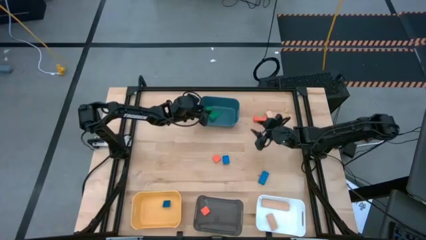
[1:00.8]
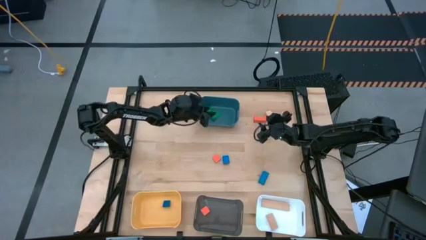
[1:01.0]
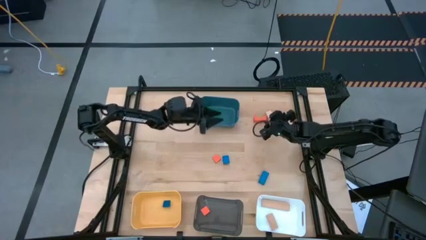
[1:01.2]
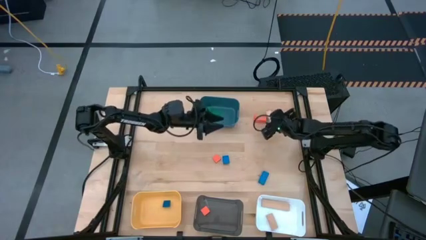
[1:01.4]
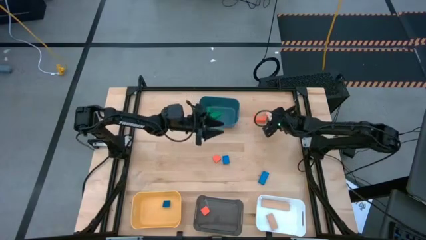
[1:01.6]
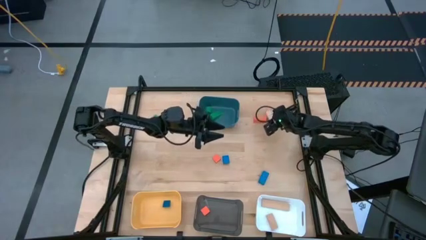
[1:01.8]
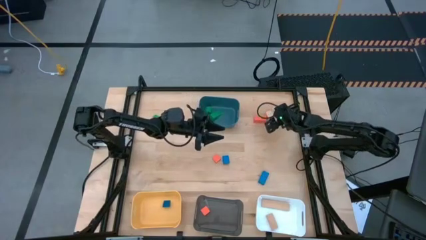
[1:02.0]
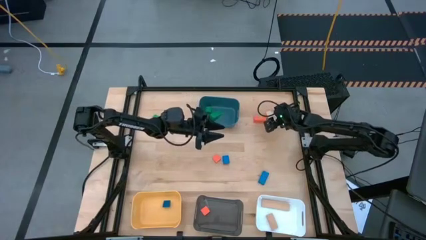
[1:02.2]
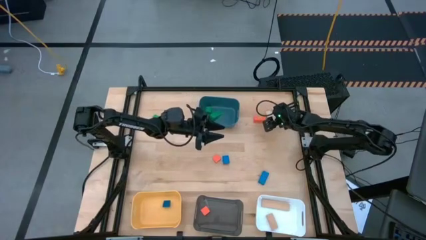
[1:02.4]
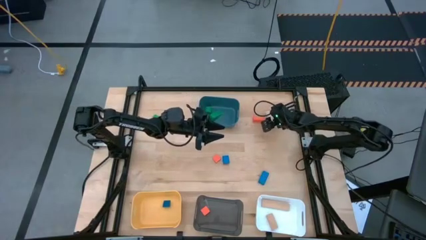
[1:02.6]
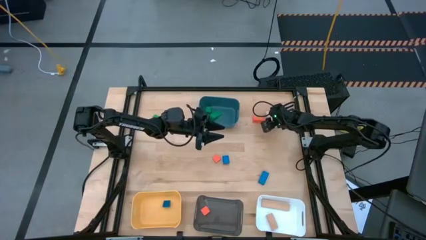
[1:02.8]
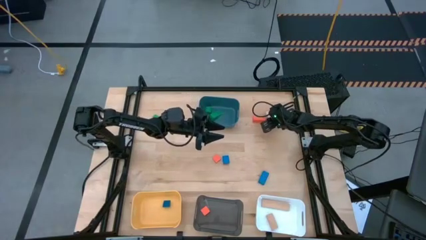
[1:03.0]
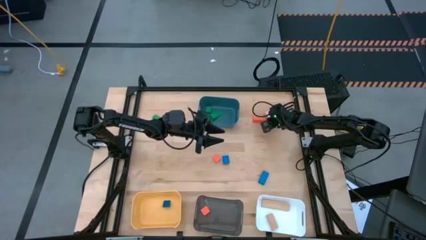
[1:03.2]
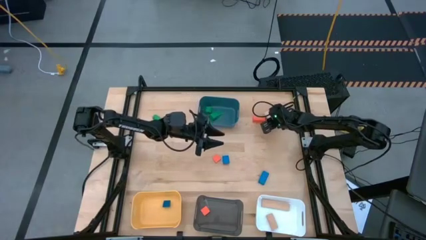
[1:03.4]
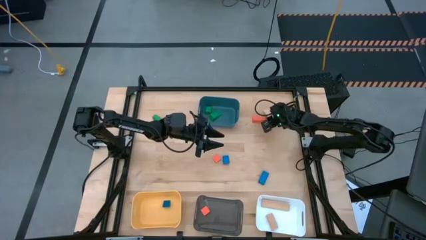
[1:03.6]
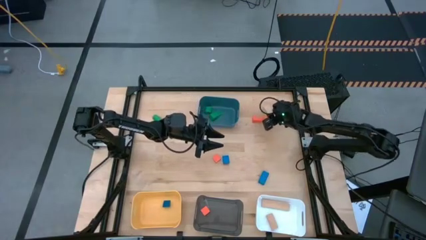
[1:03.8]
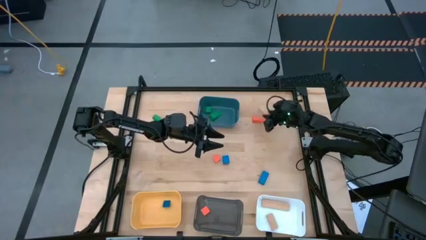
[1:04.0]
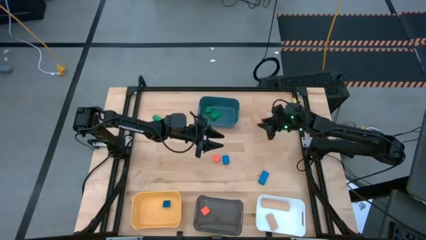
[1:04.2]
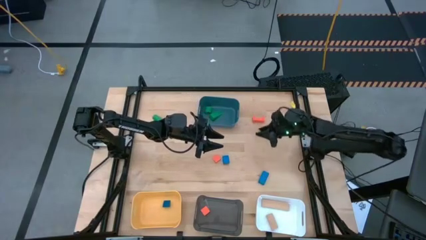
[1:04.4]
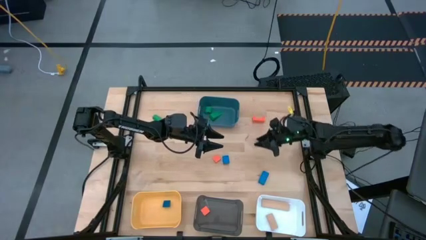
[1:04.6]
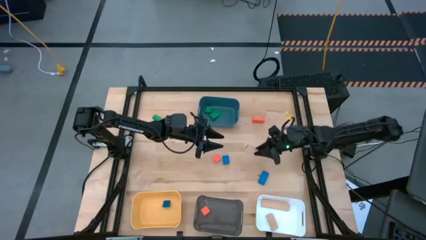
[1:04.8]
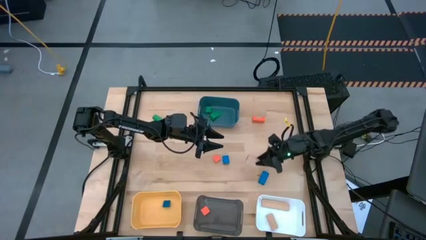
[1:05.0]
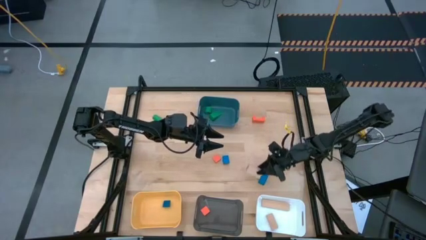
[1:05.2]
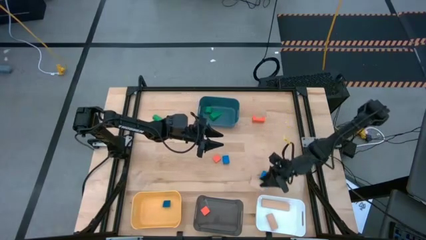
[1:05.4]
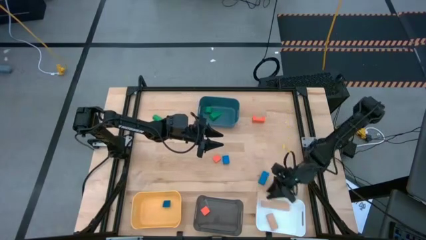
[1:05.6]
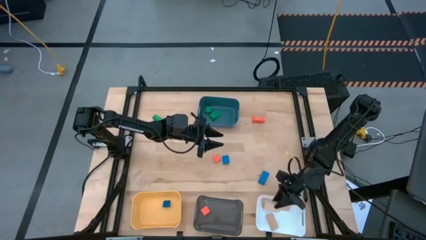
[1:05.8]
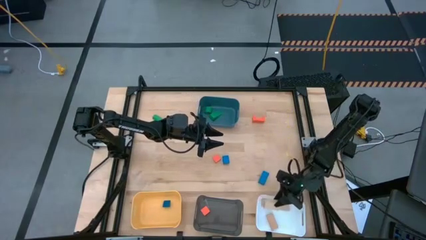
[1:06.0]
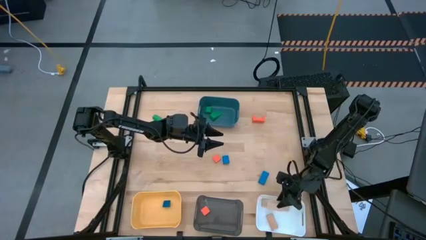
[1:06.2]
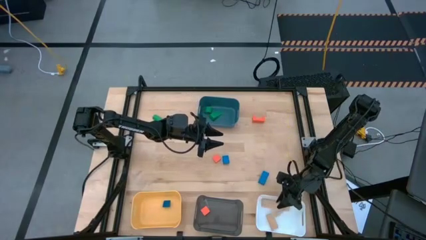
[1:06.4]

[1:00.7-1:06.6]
Task: Sort & place blocks by color
Put the light brown block into the white bin

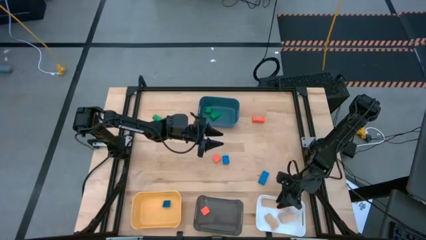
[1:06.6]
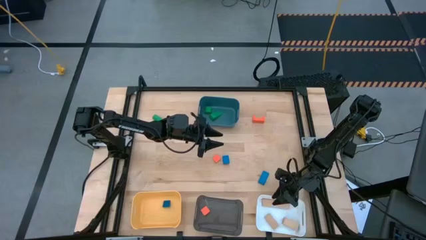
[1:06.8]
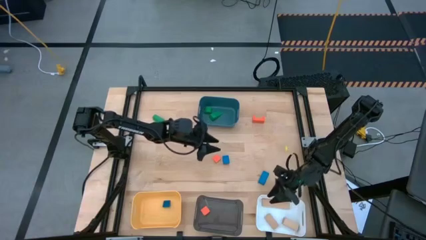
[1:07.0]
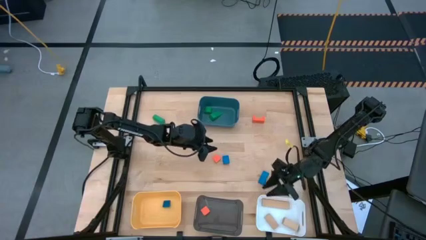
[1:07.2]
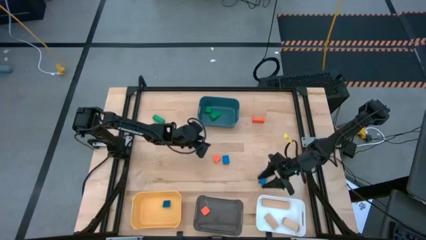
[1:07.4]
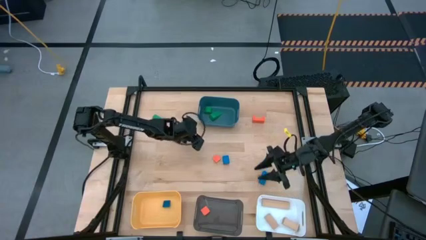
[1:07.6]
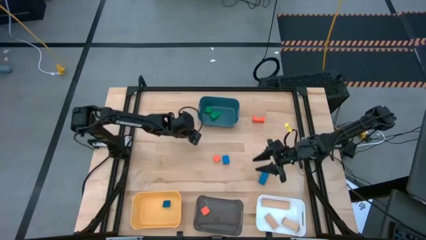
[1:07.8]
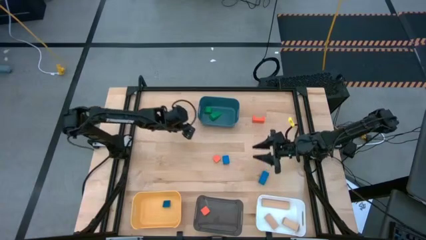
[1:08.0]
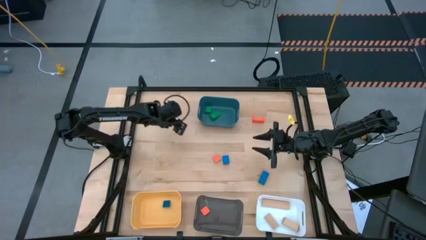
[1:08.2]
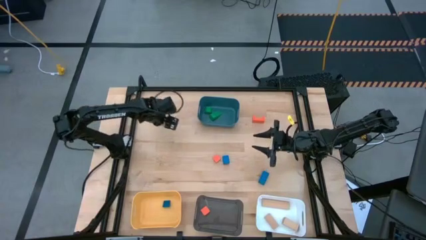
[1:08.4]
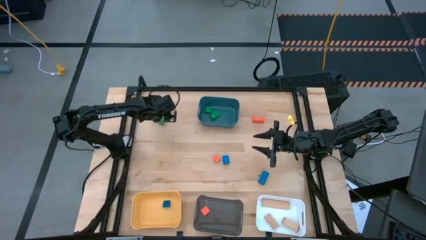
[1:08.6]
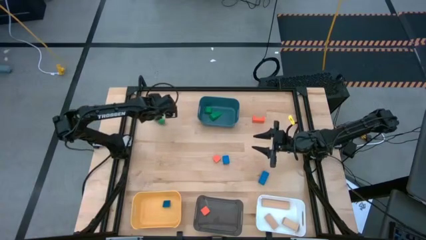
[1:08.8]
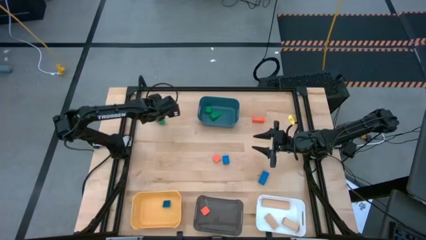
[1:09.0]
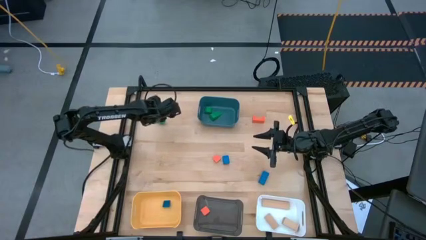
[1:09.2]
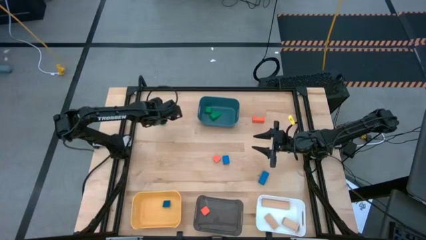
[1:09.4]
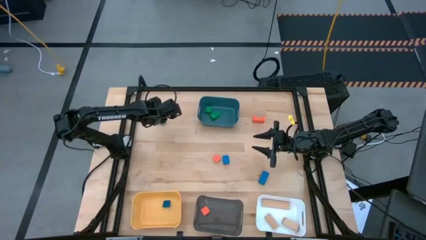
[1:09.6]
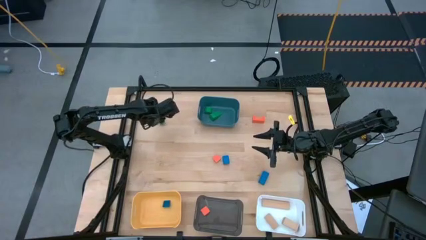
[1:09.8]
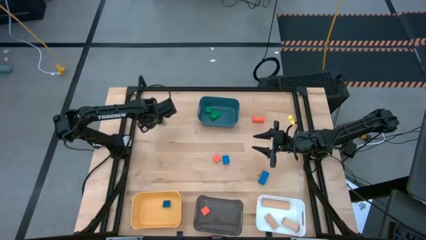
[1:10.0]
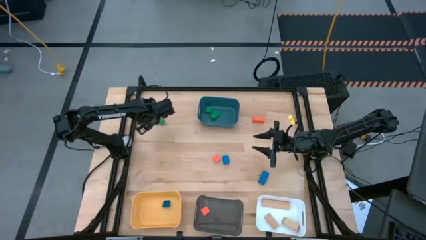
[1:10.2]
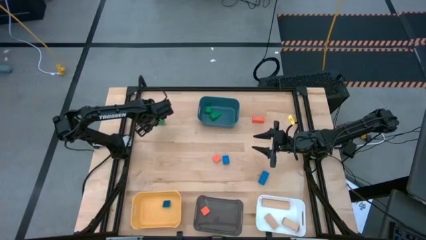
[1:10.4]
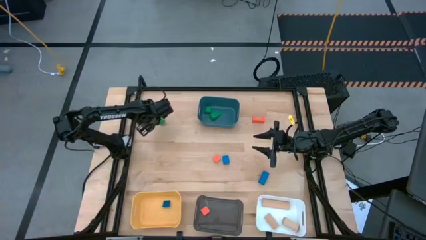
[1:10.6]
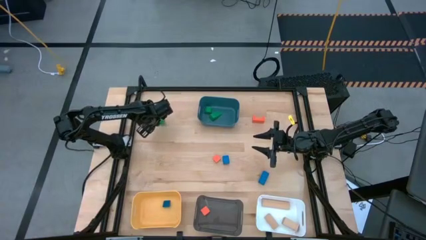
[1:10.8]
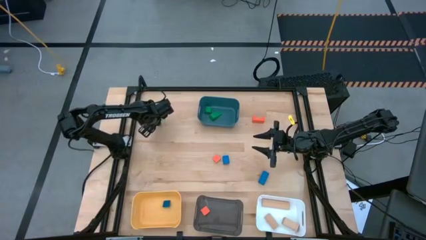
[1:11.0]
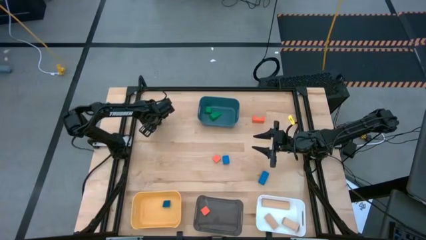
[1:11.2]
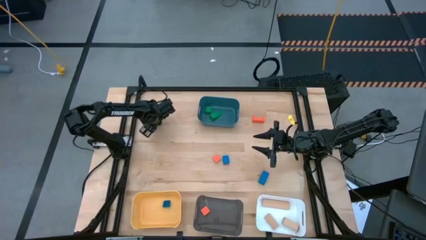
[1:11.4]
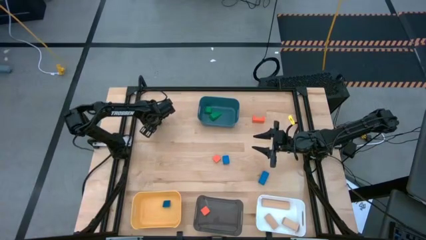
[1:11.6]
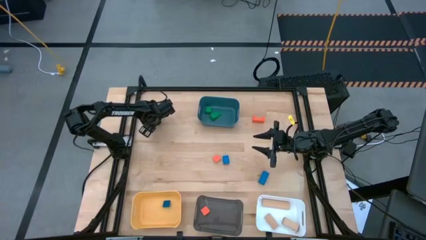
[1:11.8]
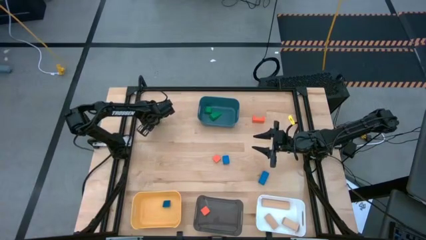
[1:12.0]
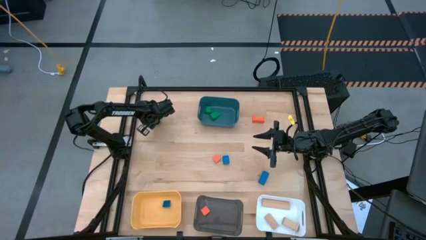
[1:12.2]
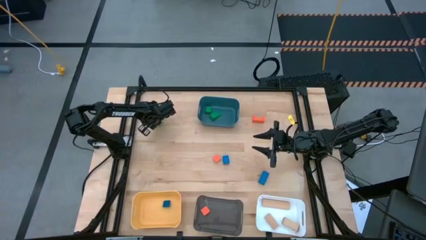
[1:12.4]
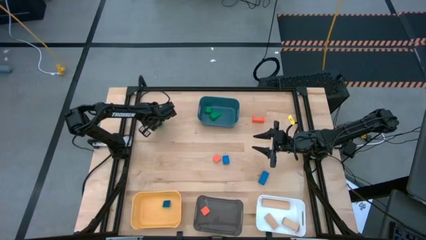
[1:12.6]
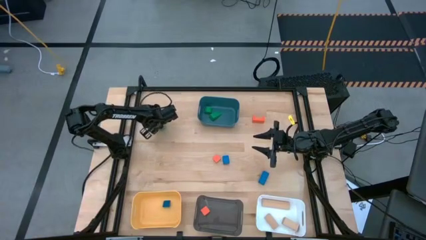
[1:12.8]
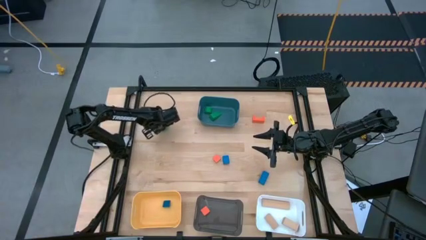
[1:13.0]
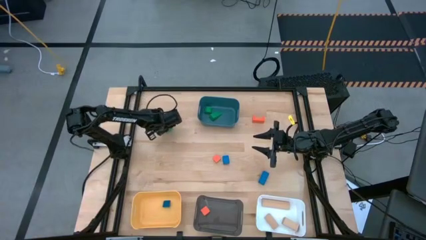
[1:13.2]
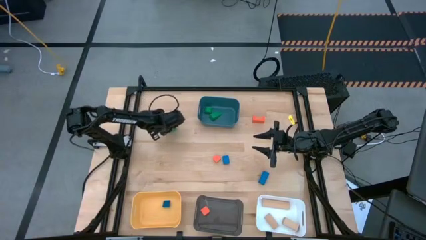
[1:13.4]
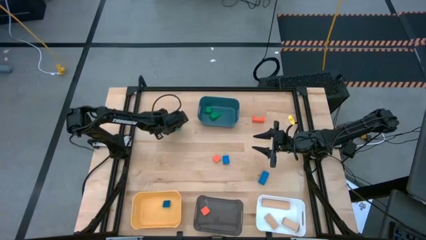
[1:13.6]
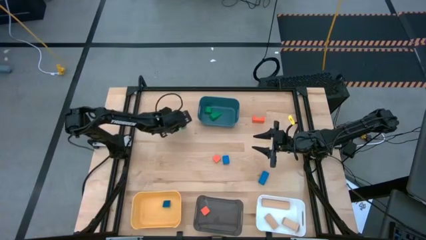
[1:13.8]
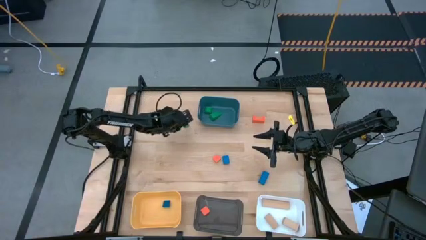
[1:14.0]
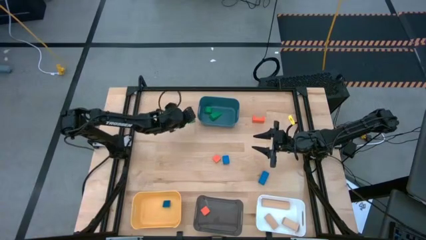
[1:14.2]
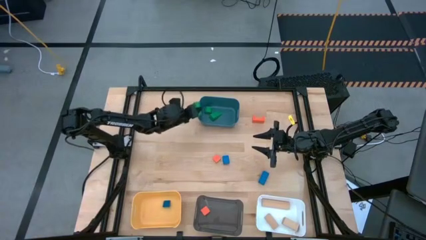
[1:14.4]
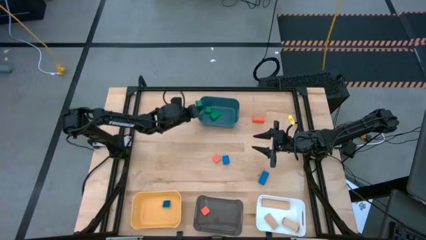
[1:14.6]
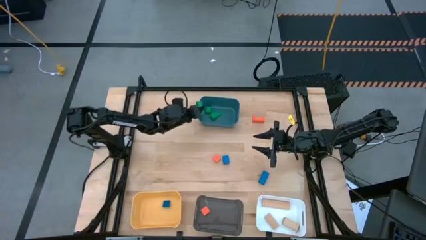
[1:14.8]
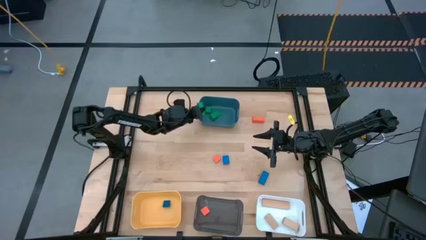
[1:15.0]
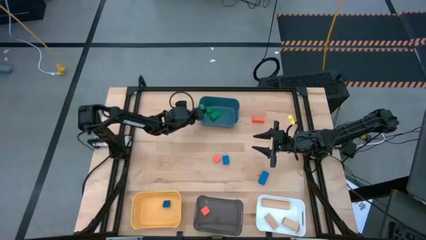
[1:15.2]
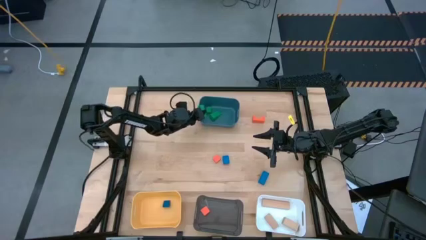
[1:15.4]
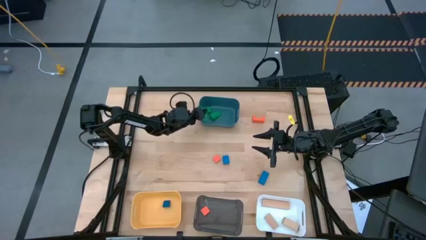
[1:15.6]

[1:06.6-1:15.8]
Put the green block into the blue bin

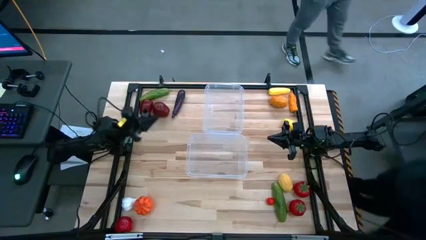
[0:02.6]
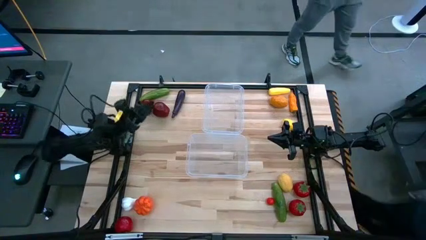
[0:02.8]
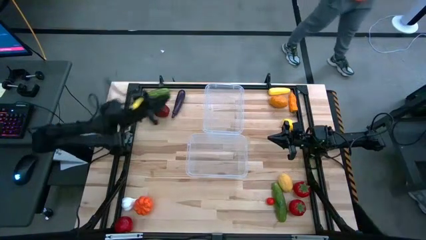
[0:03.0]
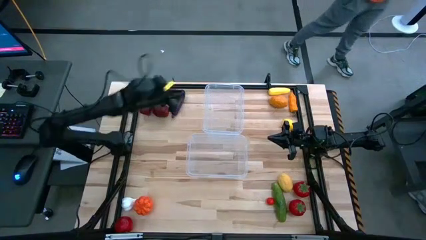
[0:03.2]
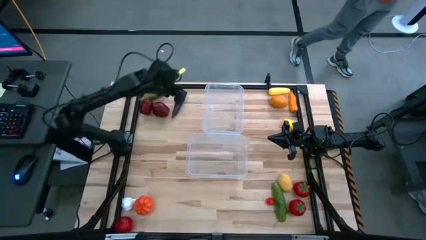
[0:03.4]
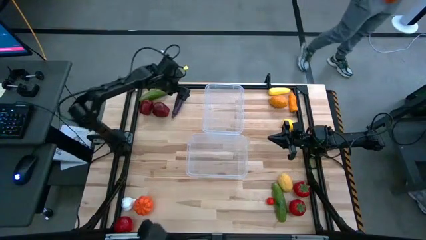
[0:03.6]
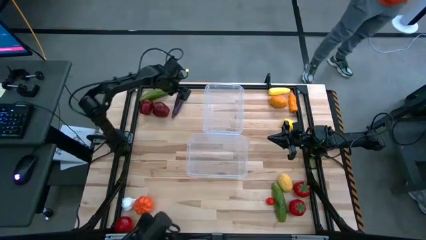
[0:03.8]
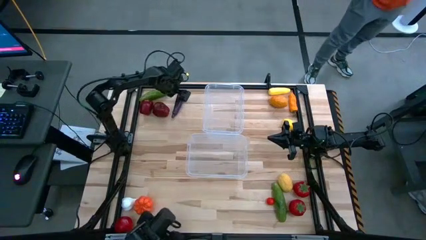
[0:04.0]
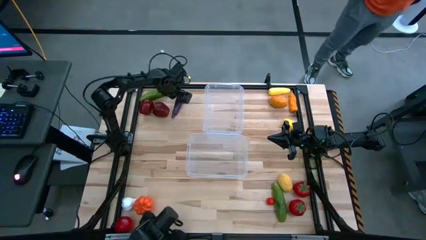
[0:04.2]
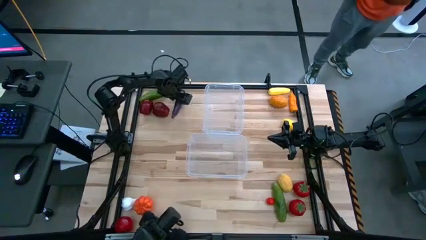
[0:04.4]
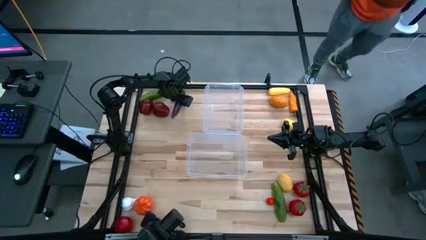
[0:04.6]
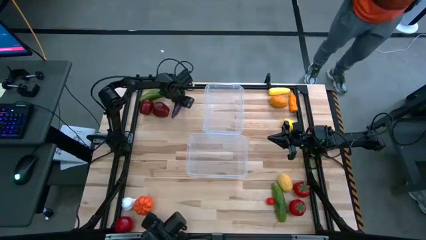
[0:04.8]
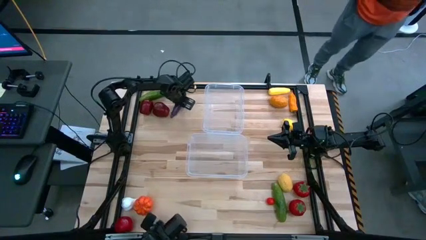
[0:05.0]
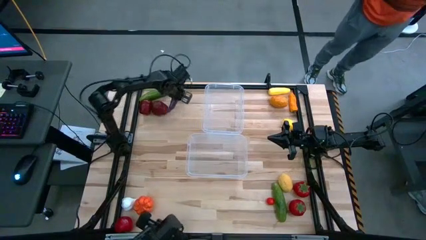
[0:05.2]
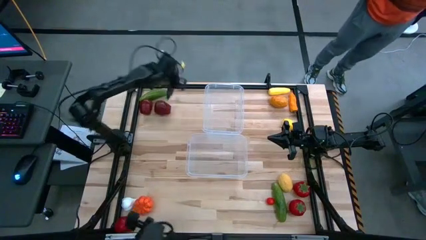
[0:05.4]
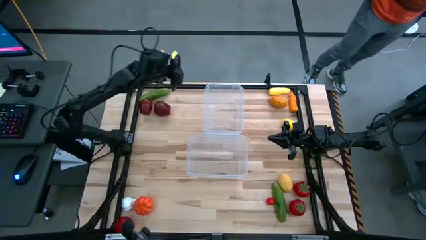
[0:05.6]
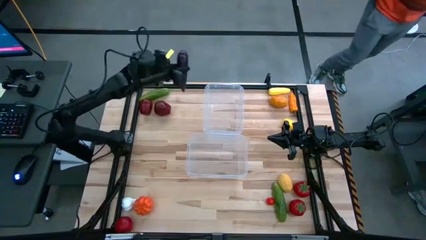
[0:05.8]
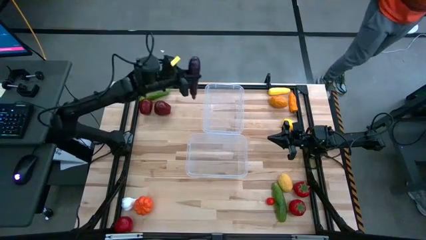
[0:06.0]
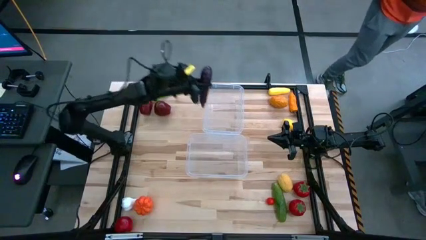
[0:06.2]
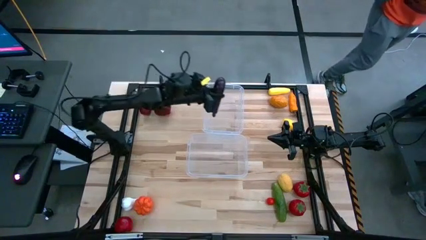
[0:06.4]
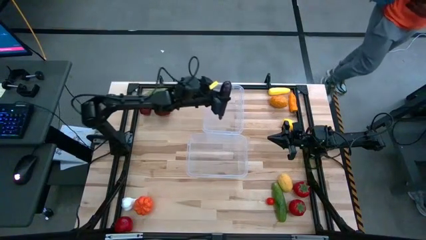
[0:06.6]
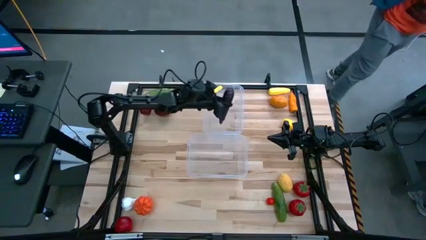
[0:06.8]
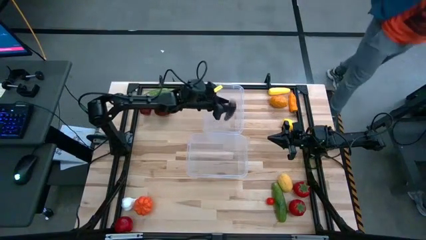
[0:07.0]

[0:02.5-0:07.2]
Task: Sort produce into baskets
Put the purple eggplant in the top transparent bin
